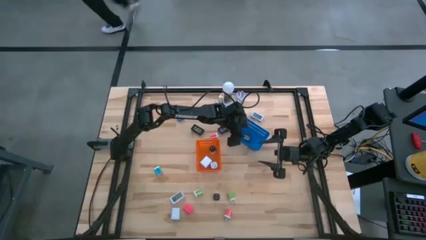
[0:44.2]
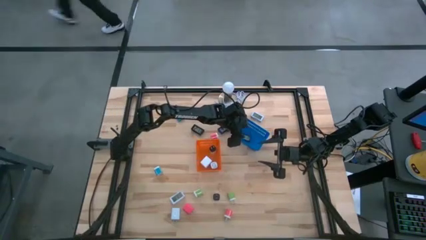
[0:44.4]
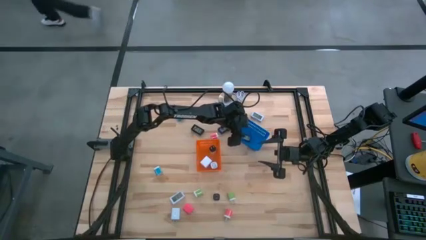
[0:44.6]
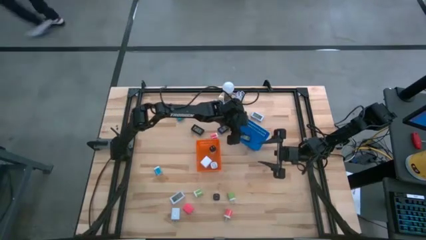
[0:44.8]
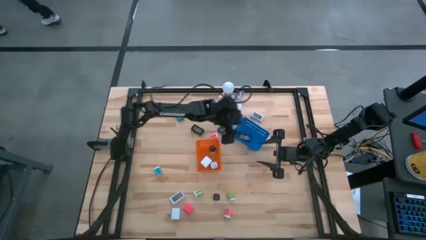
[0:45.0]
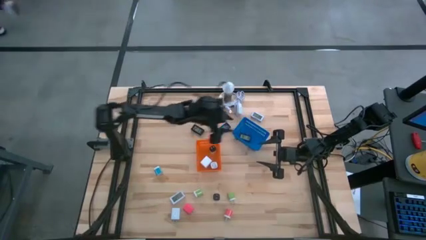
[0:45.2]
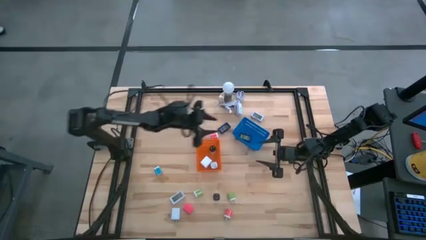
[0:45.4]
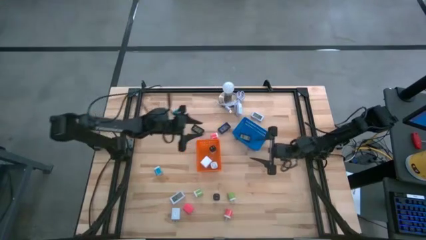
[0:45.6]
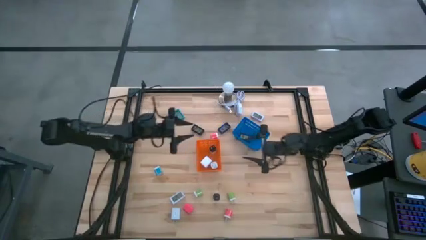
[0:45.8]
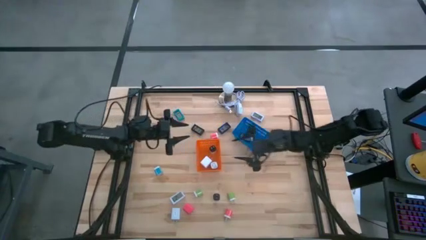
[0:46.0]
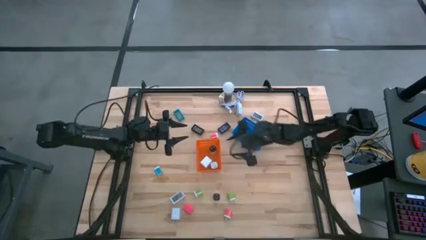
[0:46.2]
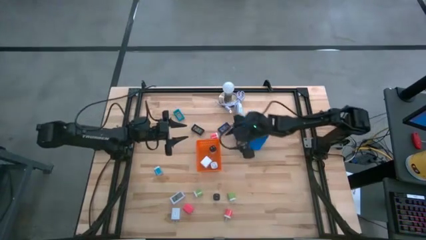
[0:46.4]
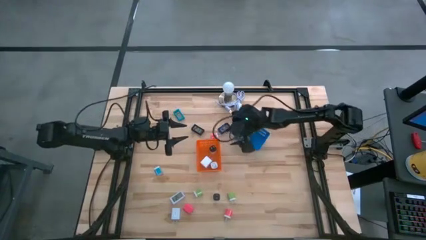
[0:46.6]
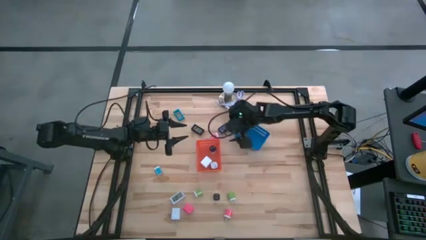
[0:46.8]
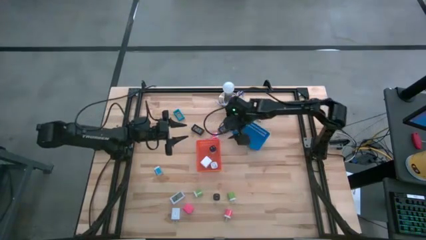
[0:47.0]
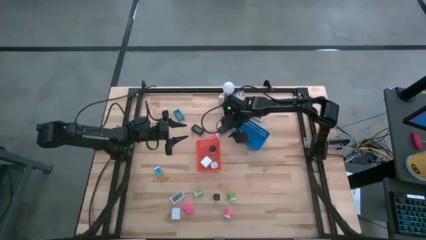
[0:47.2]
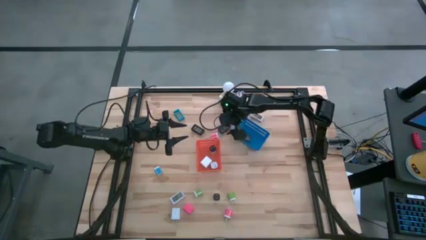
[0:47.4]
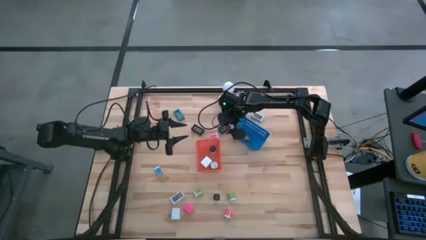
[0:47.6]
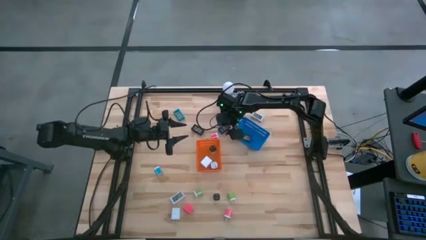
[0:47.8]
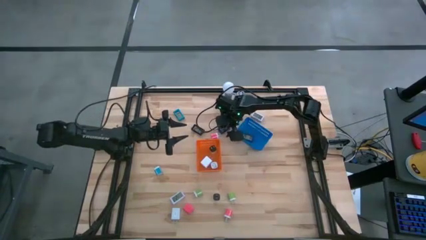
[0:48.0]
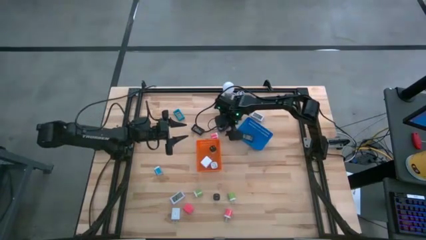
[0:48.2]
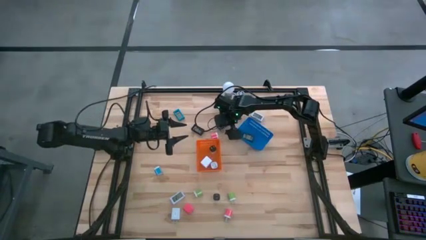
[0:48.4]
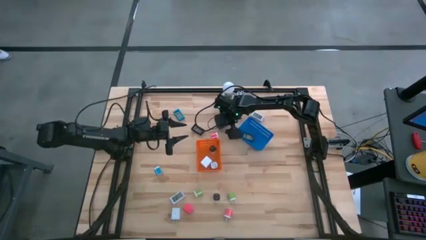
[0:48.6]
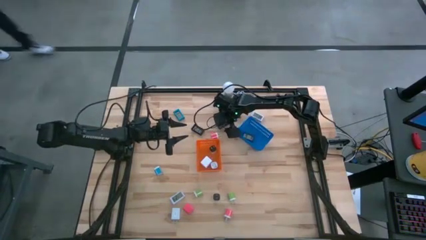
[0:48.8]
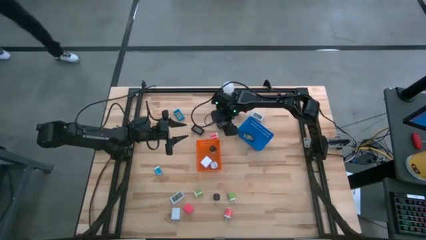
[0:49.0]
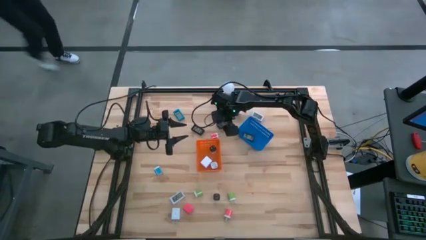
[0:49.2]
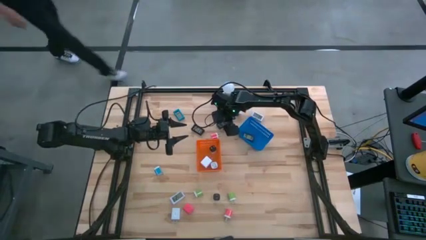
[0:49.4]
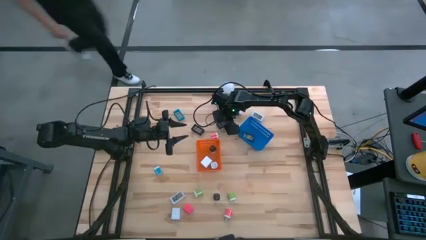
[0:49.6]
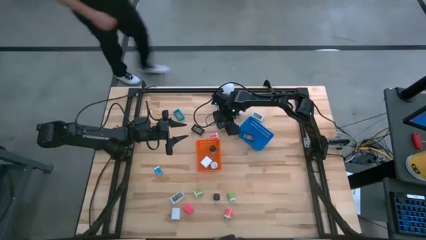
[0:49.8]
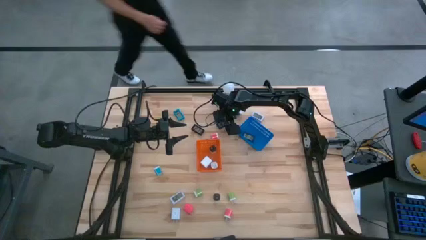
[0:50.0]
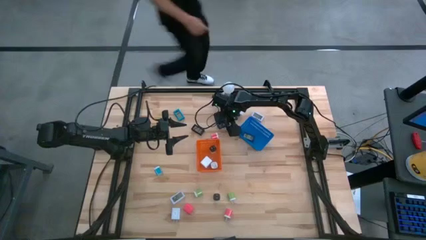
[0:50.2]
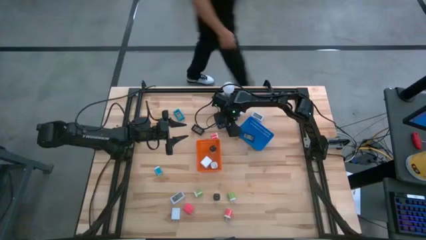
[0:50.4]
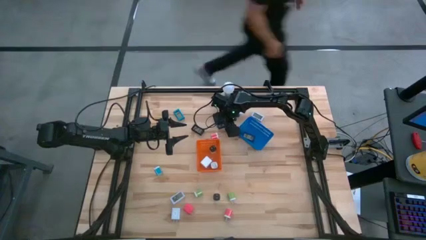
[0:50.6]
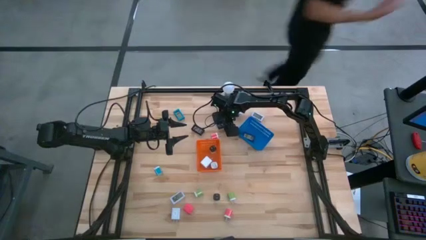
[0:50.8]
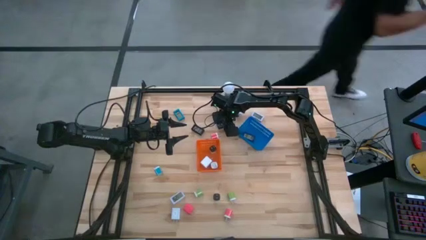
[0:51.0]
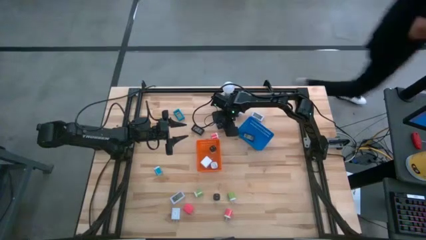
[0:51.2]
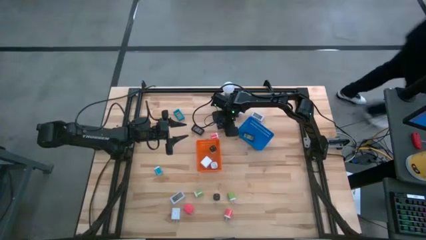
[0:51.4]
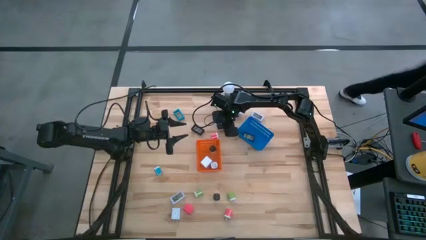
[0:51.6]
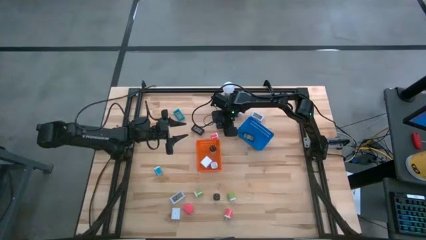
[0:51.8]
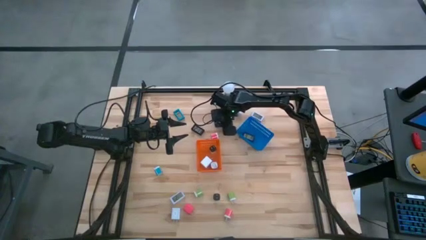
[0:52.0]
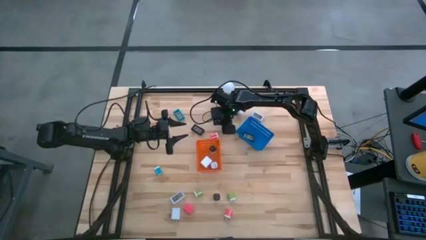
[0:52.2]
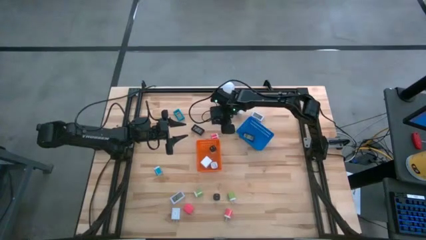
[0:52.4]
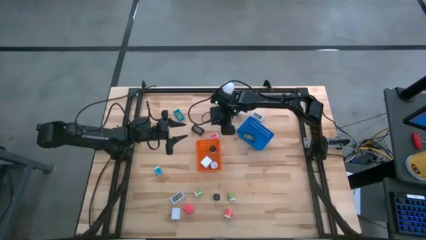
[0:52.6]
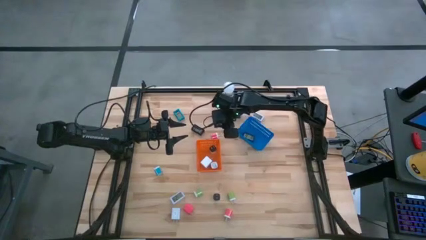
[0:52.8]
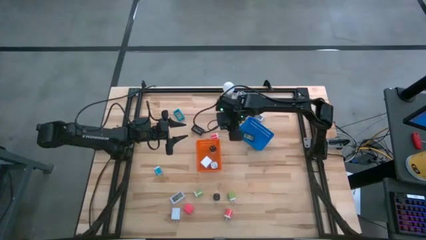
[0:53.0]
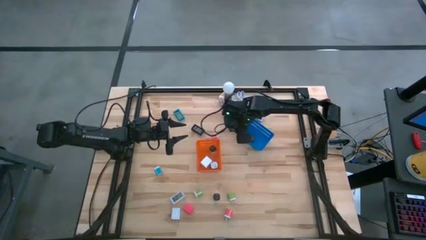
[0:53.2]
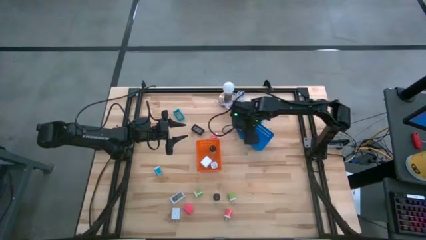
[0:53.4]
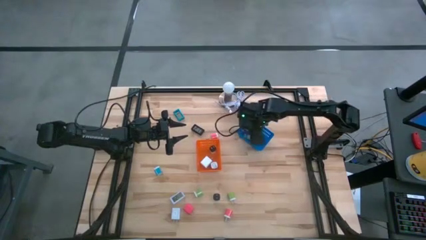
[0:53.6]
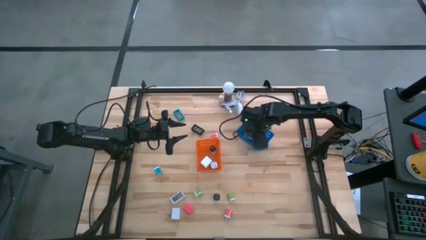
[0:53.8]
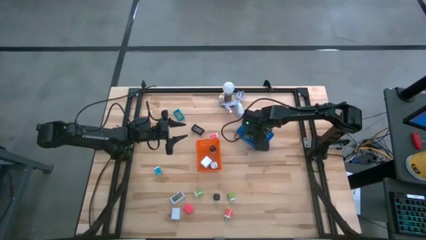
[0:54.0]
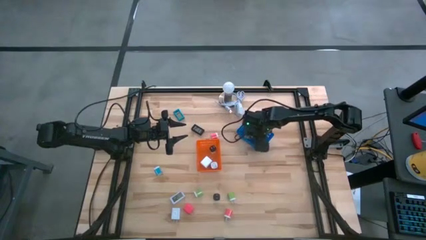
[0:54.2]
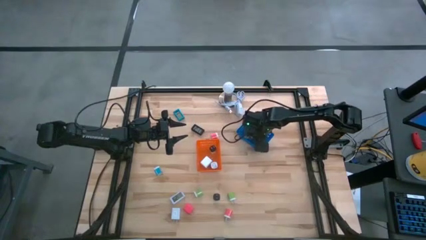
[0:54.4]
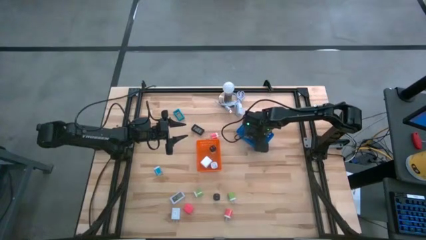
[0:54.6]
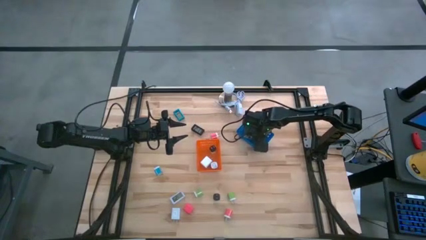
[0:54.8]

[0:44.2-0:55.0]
Task: Pick & Place Office items
Put the blue digital timer into the blue bin

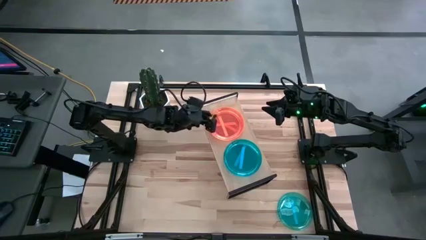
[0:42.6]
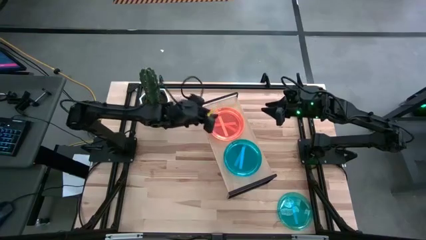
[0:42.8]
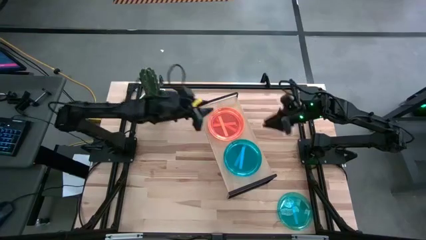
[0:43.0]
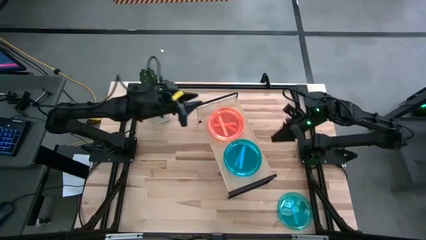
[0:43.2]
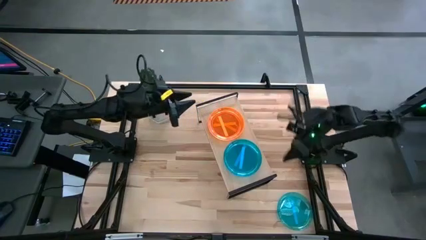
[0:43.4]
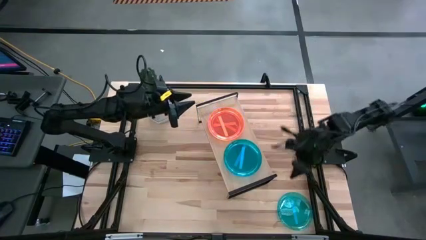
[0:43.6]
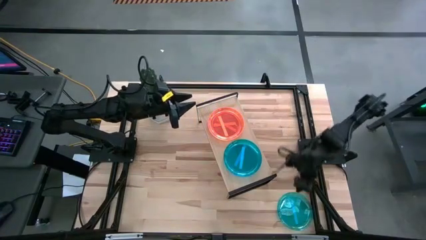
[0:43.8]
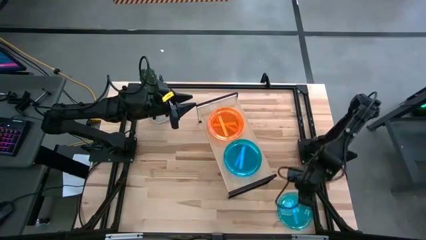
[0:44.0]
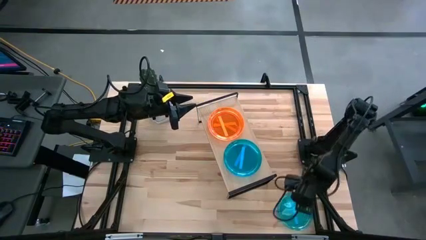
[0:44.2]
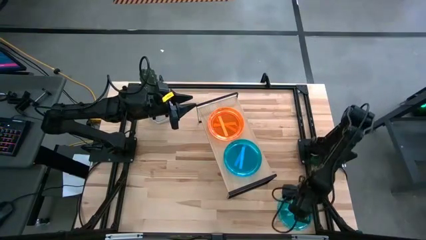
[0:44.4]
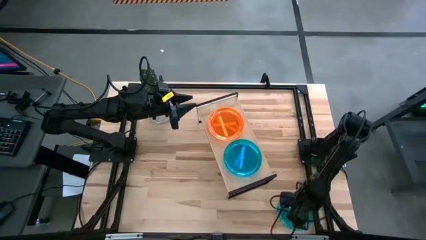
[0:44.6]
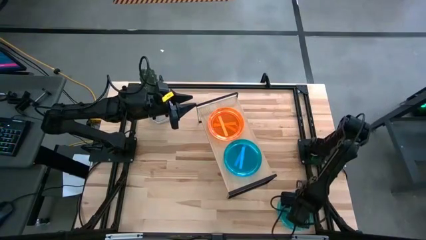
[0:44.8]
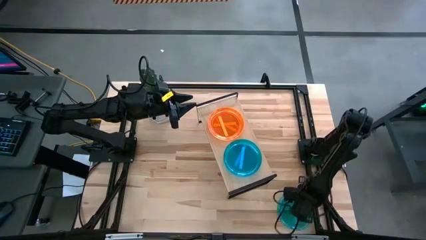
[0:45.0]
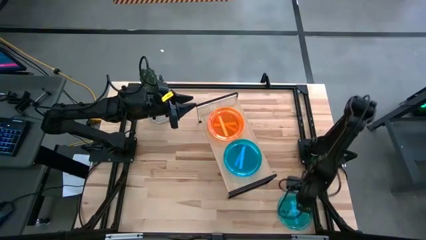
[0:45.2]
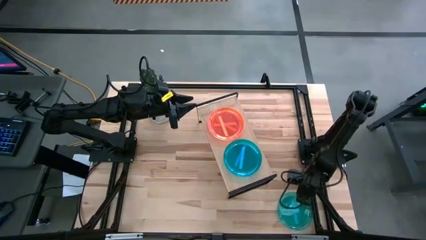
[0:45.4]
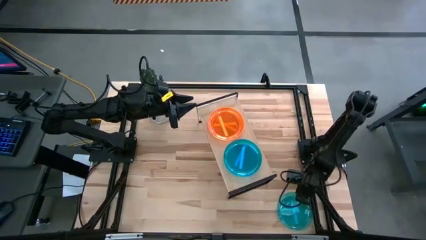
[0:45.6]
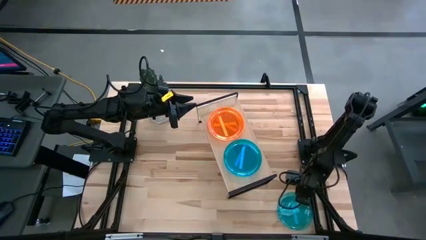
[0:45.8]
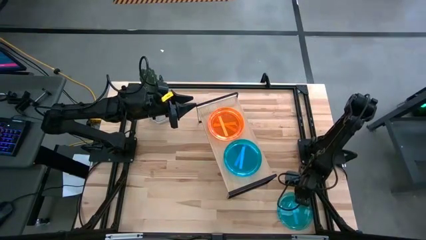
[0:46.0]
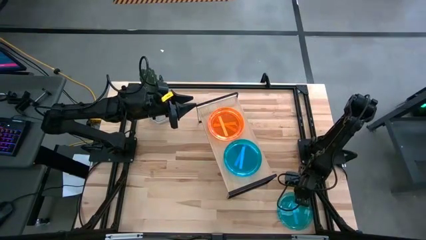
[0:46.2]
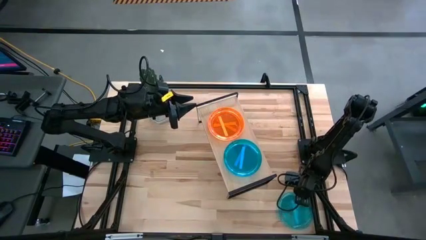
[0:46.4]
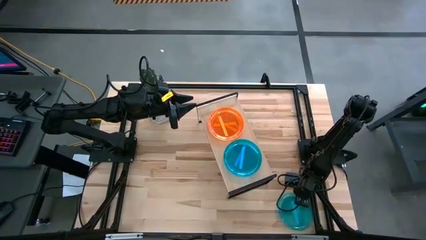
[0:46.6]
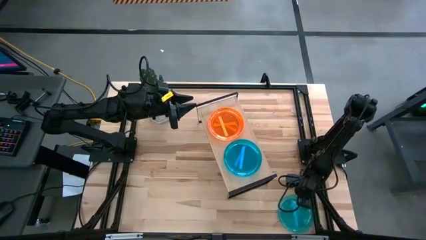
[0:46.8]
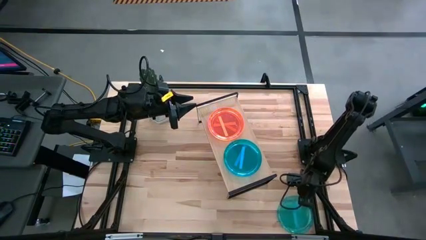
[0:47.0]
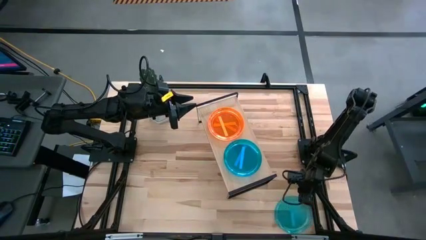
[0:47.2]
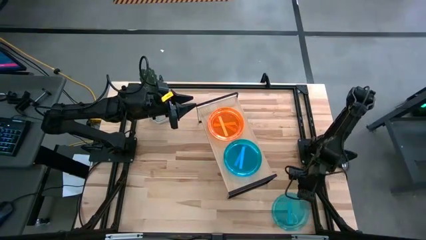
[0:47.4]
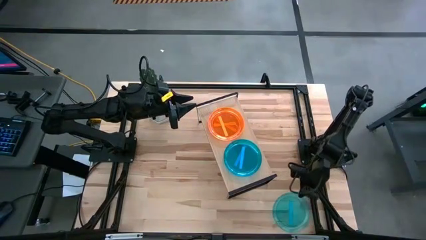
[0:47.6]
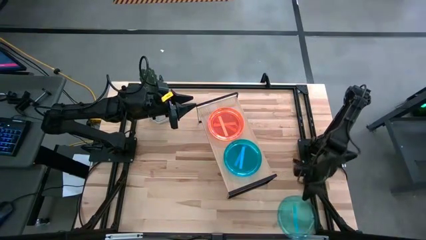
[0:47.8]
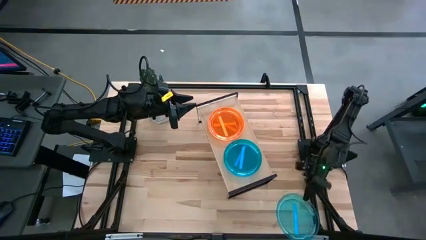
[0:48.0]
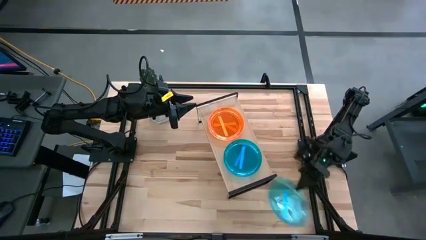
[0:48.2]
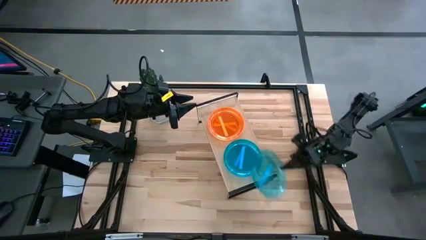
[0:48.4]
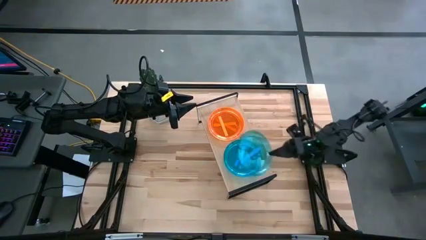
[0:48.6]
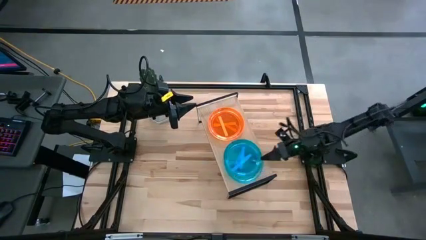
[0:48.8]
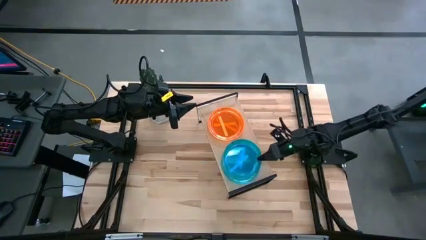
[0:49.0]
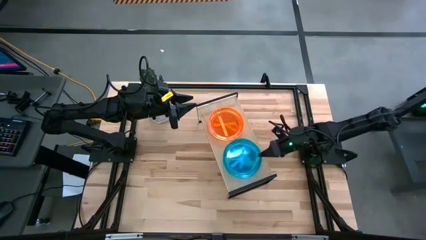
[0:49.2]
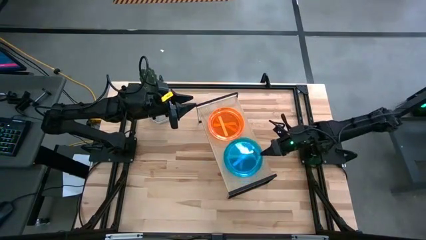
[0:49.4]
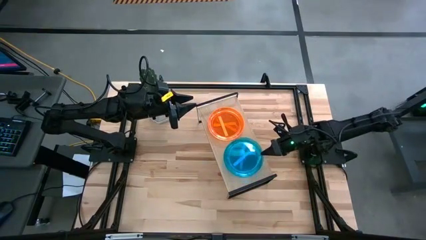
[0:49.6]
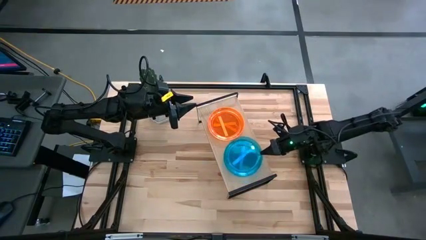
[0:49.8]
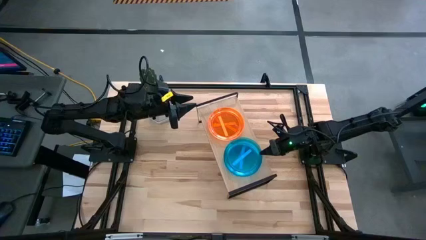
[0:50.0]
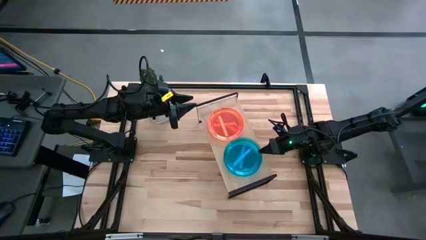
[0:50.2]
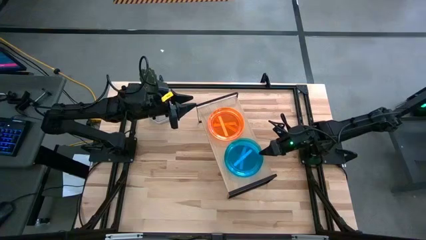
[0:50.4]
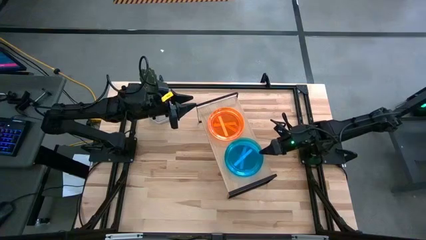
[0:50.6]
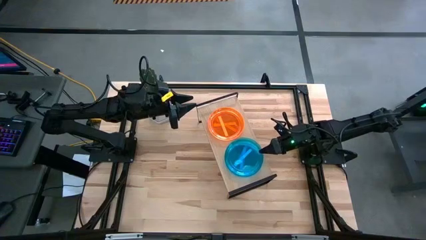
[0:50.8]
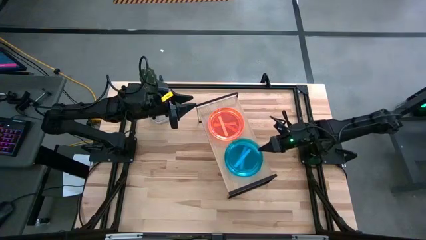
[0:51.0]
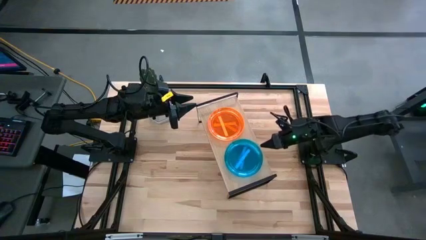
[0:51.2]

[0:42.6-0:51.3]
Task: Place and stack plates onto a shelf
Stack the blue plate on top of the blue plate on the shelf
